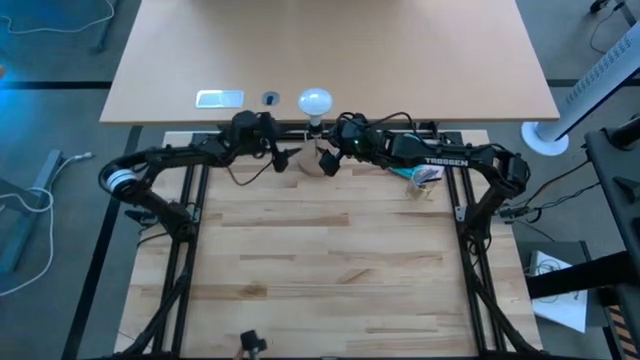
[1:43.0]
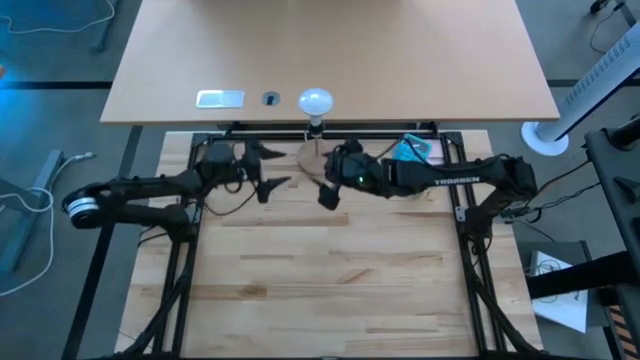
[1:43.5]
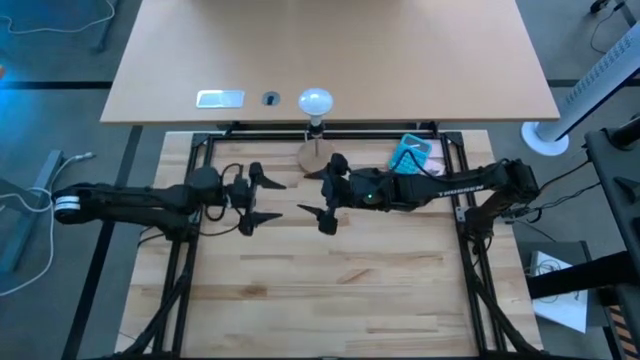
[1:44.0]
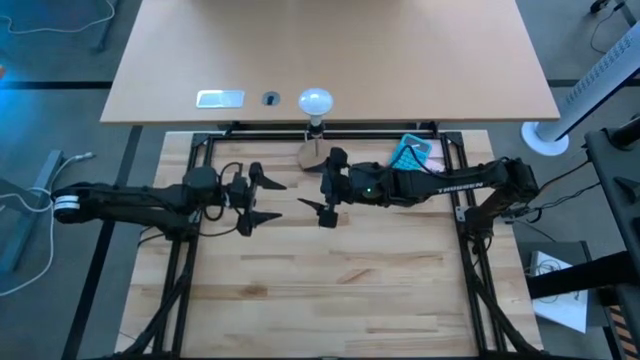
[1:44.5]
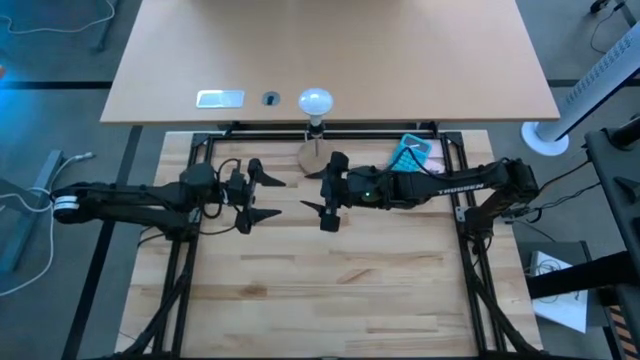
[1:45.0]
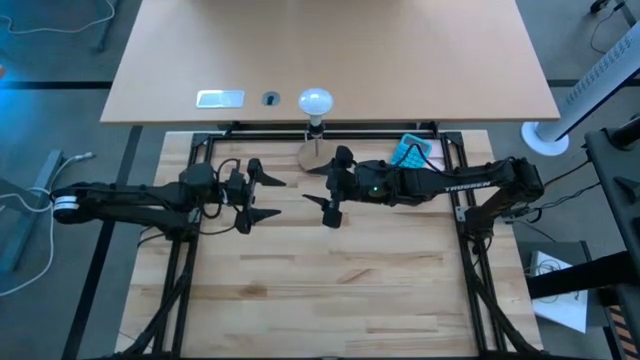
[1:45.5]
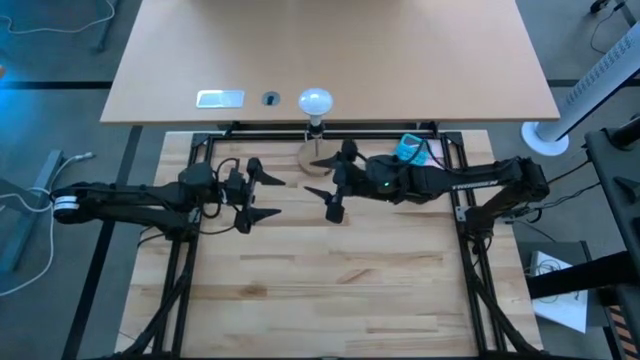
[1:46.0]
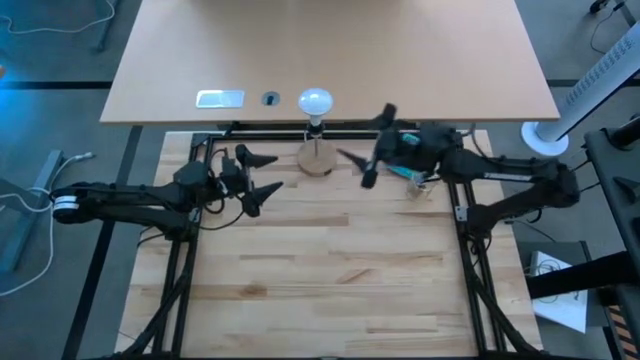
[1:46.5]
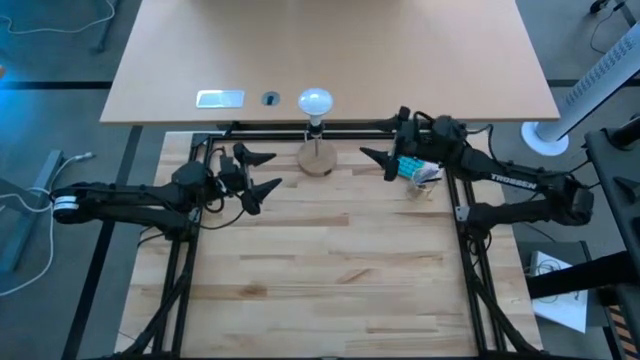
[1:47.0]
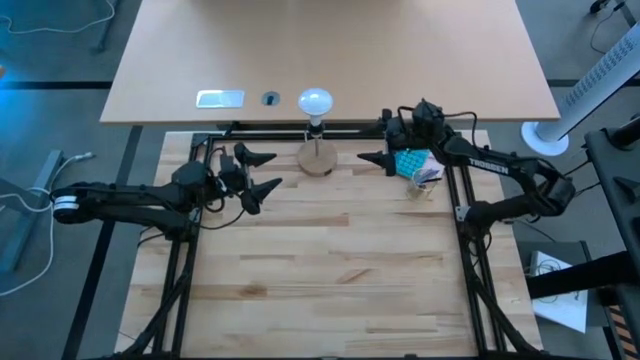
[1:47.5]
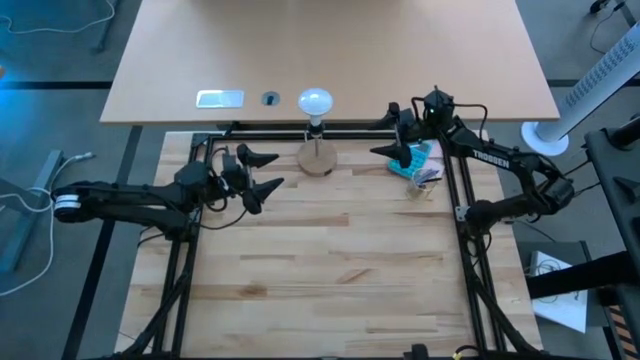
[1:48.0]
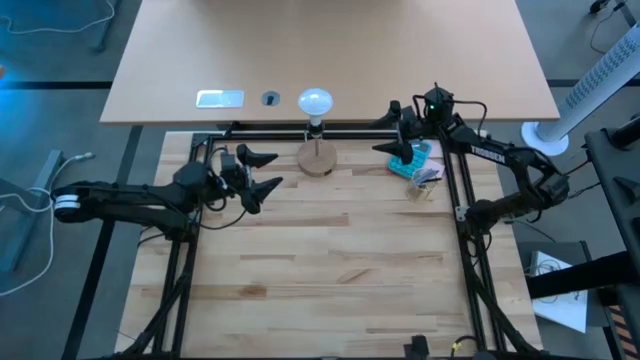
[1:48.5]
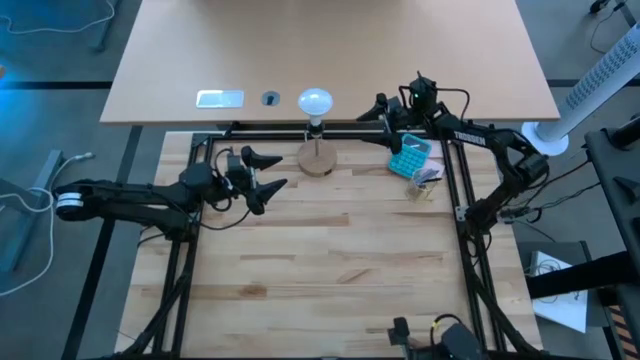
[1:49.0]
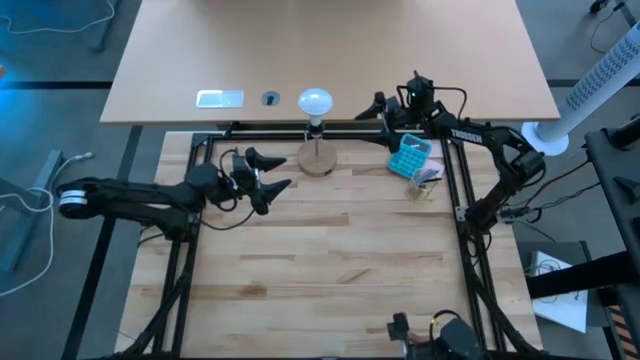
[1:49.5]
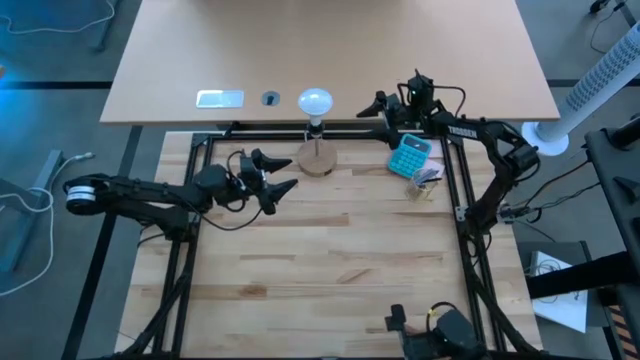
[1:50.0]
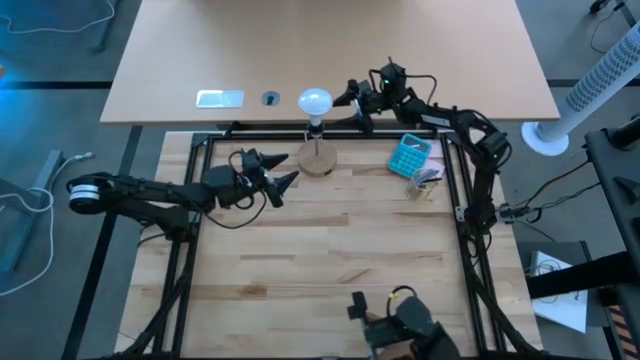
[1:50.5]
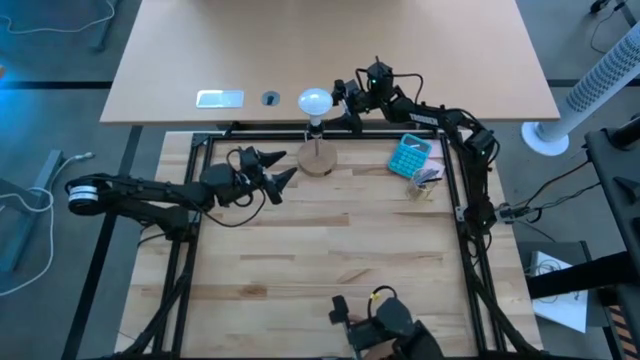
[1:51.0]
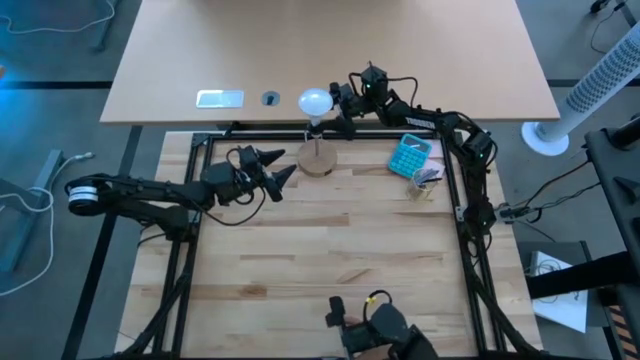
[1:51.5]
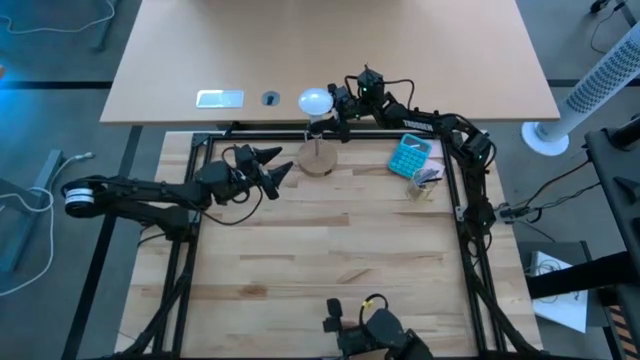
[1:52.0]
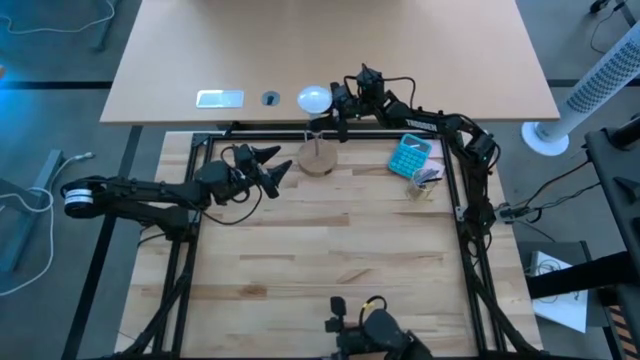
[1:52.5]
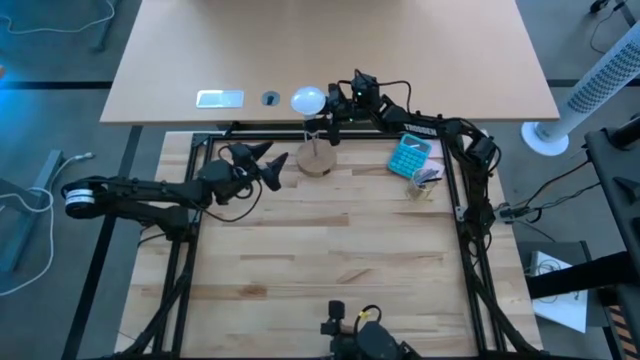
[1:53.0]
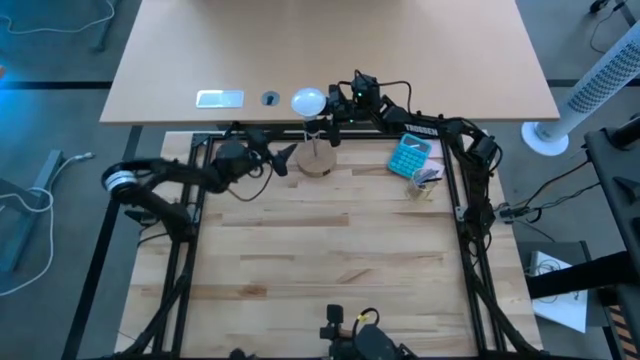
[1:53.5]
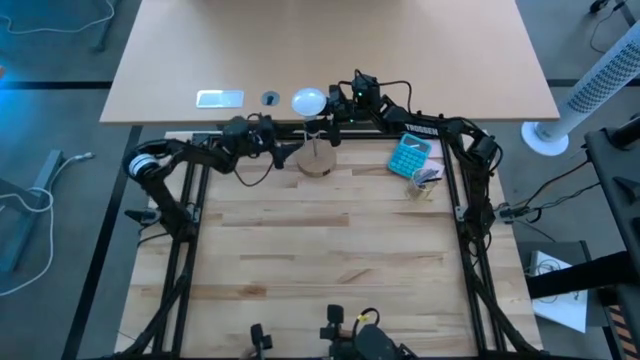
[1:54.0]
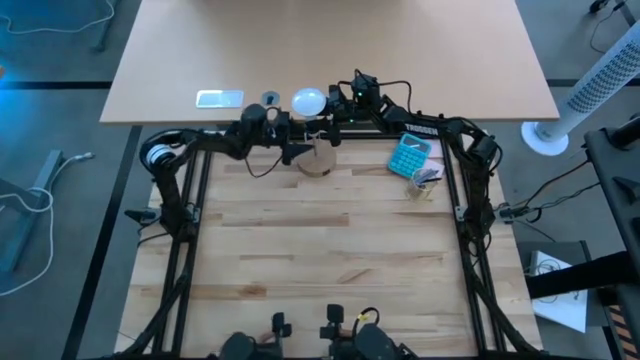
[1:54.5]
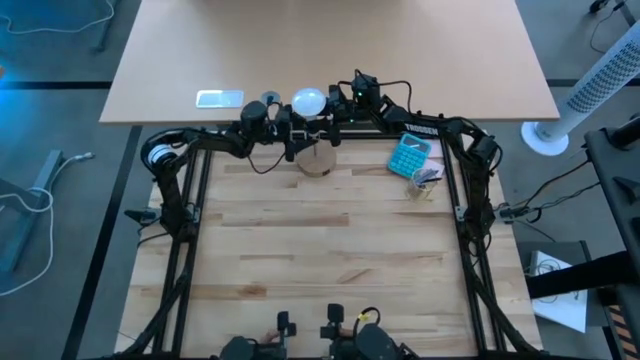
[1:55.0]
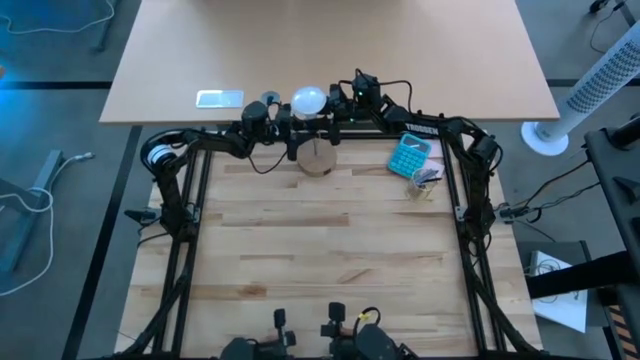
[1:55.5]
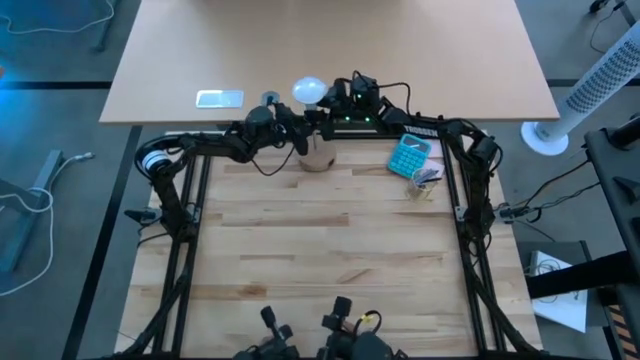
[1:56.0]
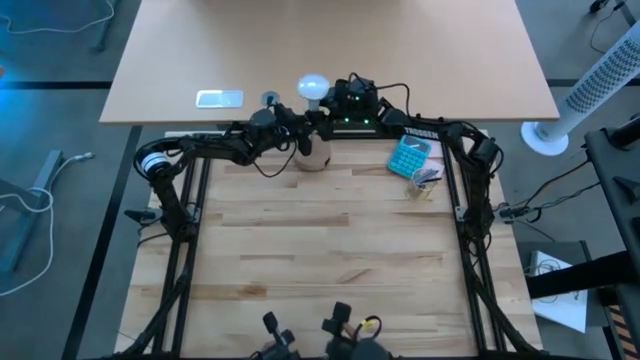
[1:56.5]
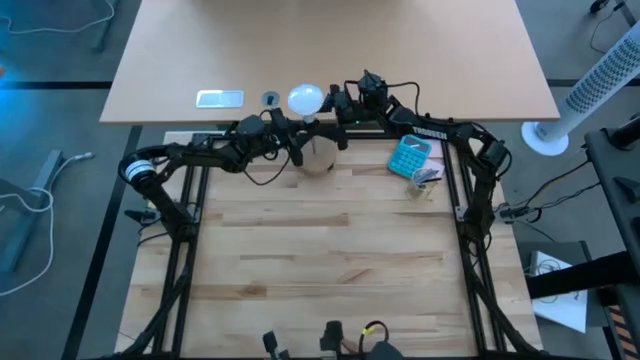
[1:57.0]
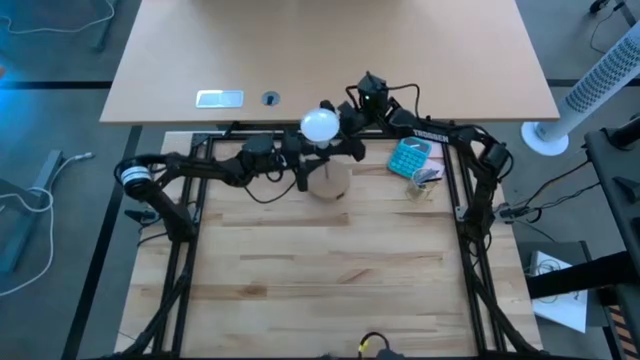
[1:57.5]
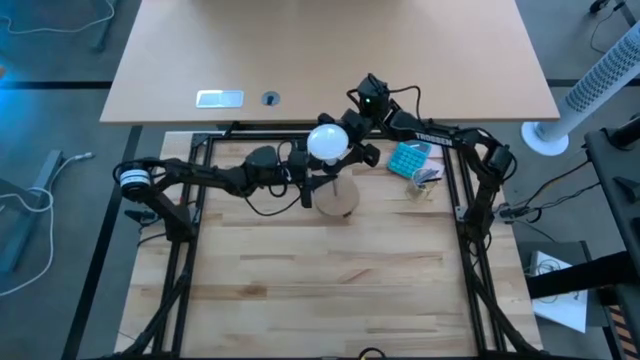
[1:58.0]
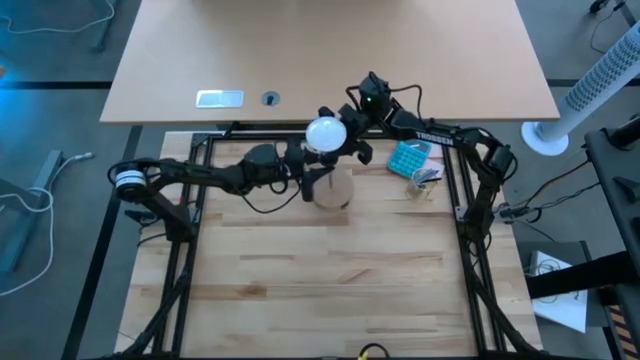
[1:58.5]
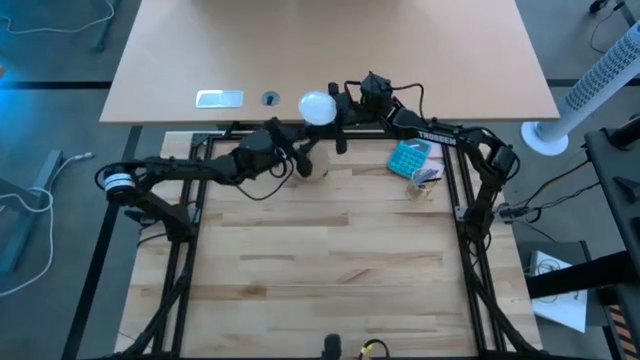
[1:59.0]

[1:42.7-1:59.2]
Task: Screw lightbulb
Remove the light bulb from the table lamp

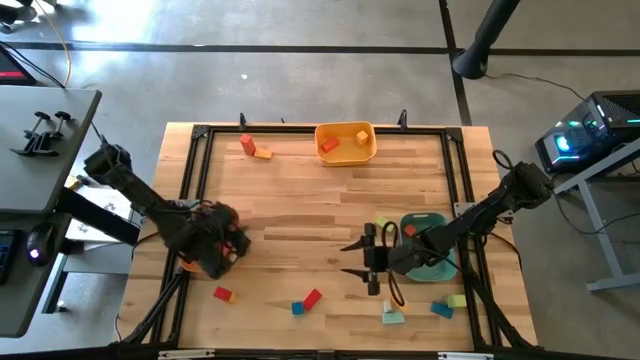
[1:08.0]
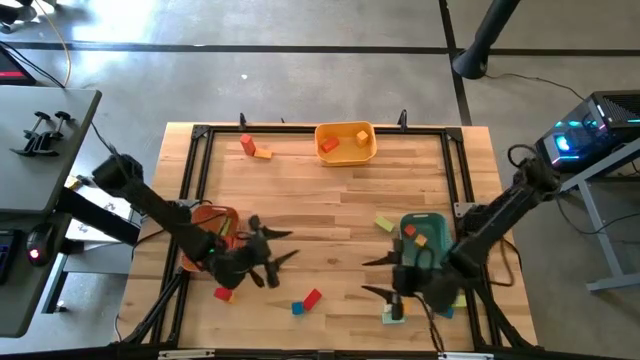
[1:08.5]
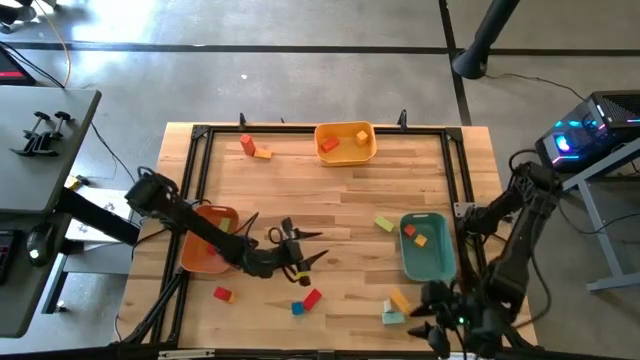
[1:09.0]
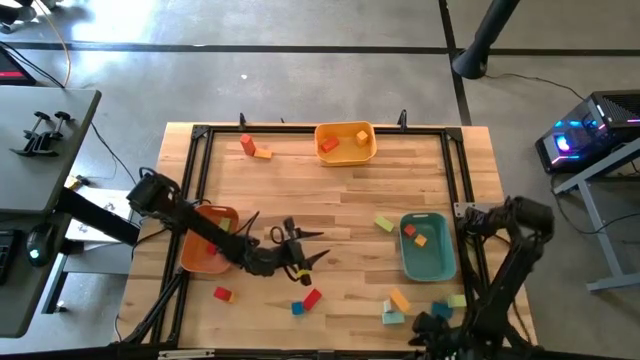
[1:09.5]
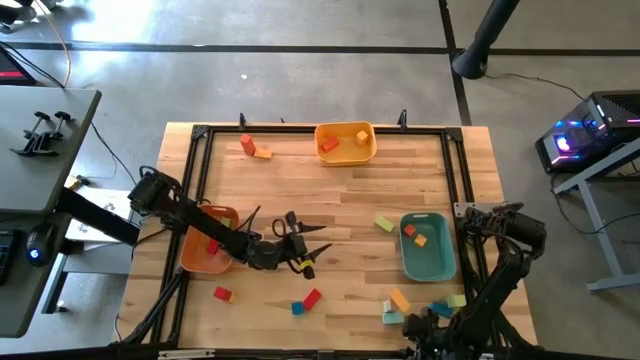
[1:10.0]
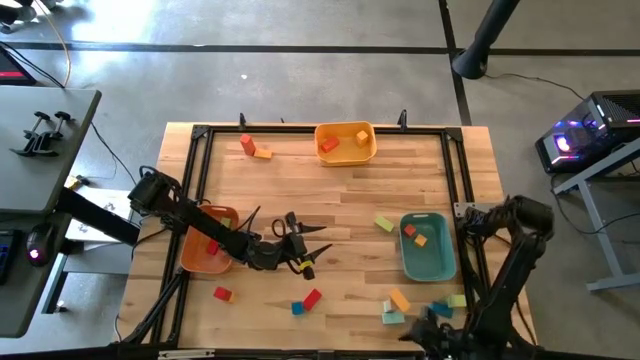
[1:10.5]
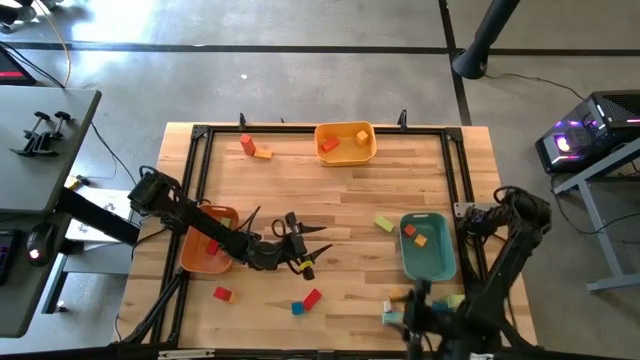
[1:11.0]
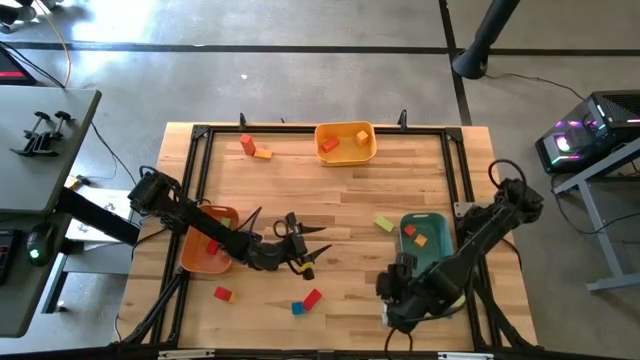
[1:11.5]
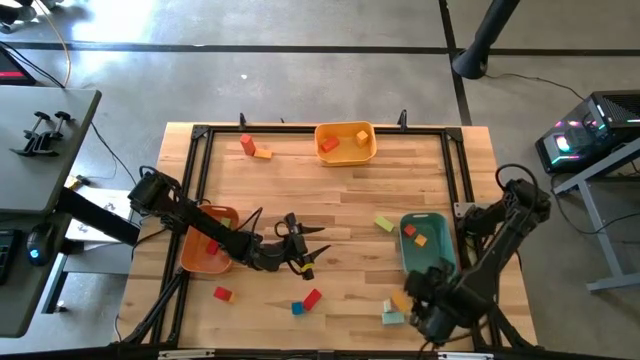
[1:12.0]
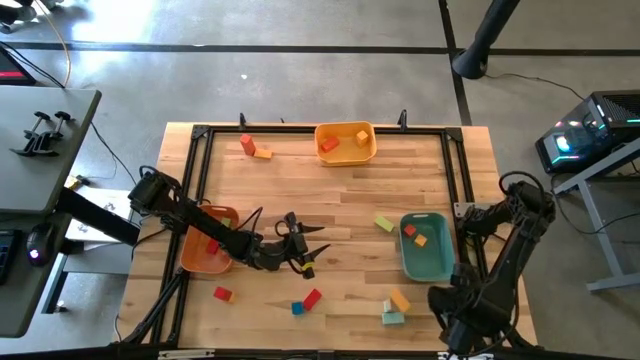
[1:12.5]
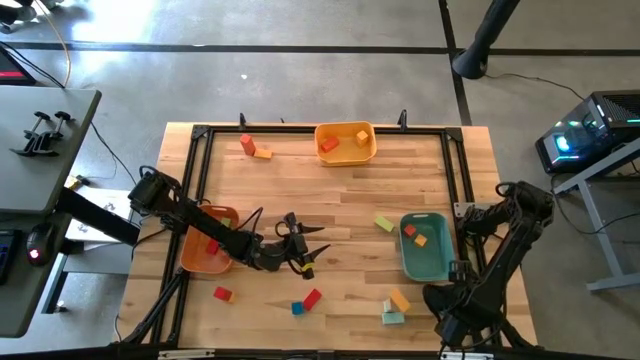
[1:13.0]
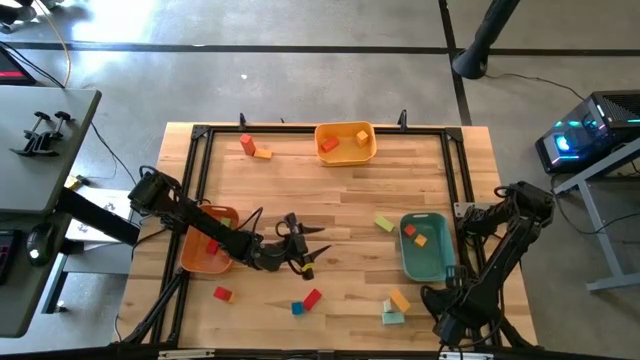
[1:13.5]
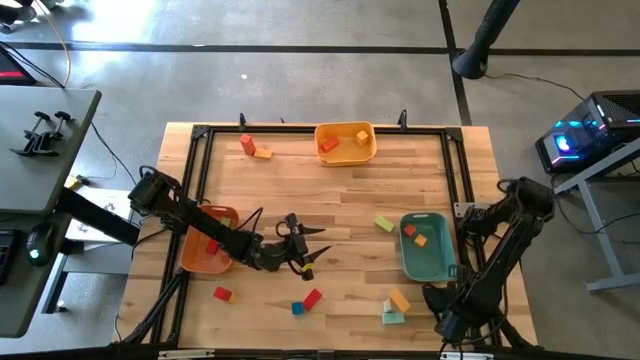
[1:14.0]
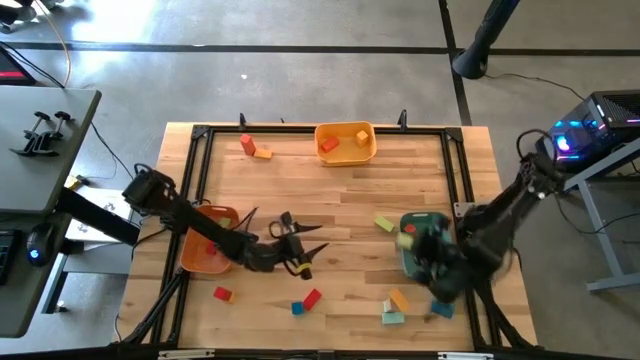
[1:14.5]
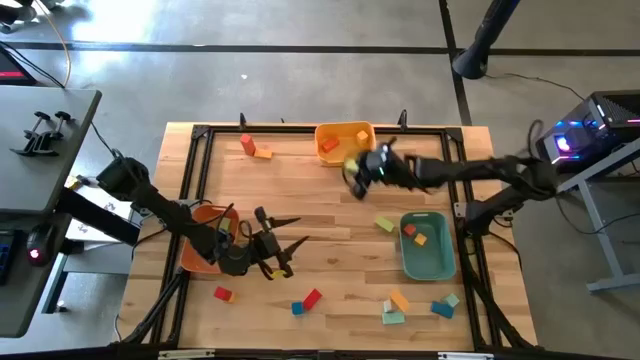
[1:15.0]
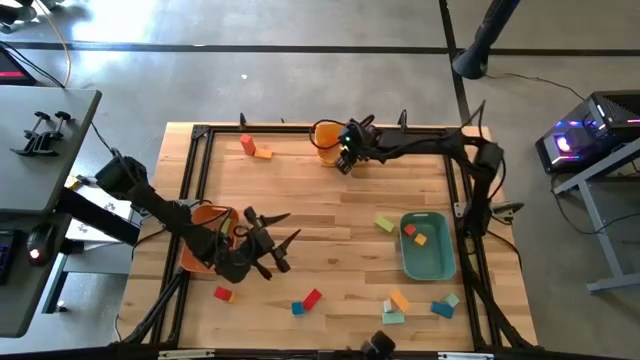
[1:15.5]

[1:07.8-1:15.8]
Task: Sort blocks by size
Put the green large block into the yellow bin
